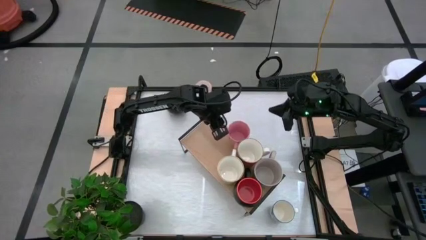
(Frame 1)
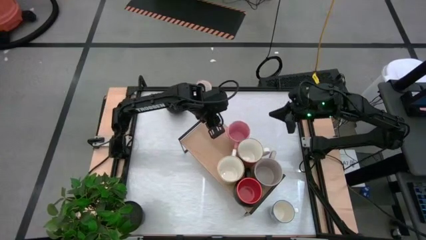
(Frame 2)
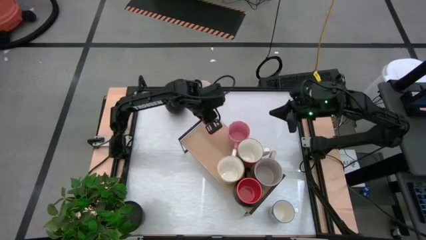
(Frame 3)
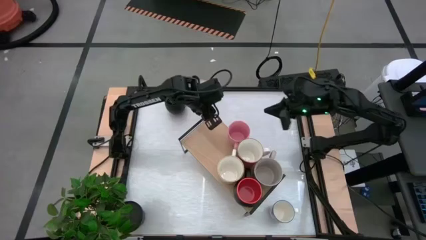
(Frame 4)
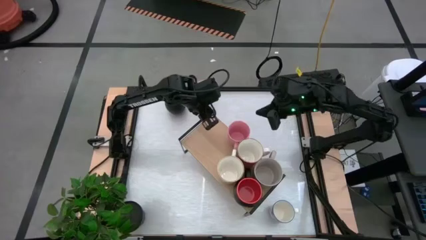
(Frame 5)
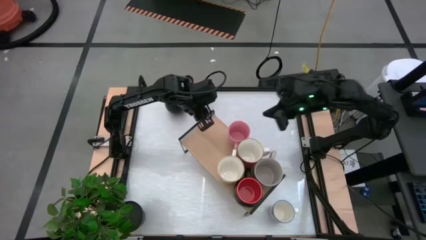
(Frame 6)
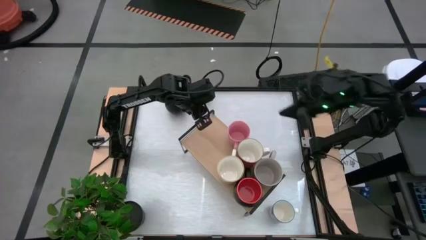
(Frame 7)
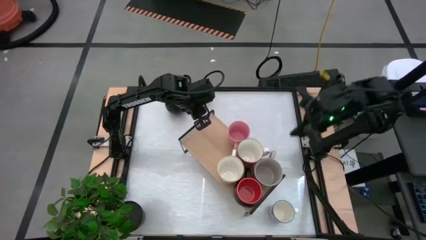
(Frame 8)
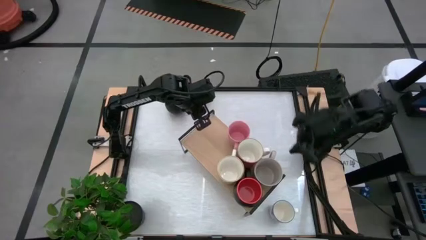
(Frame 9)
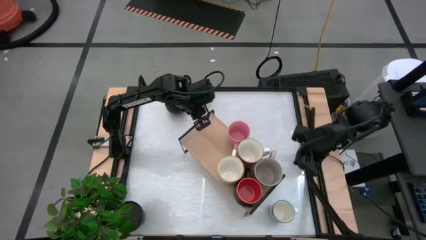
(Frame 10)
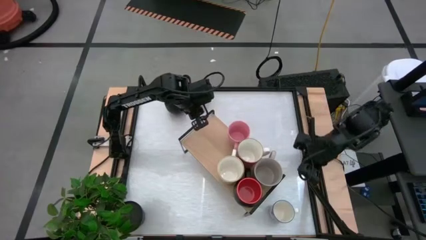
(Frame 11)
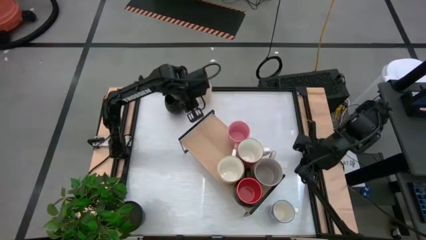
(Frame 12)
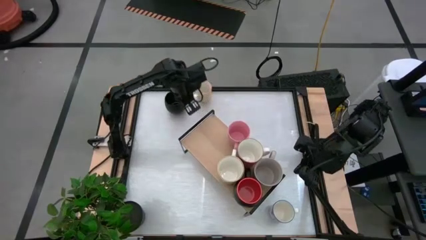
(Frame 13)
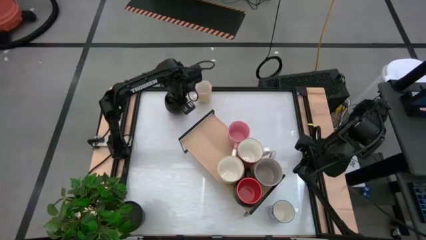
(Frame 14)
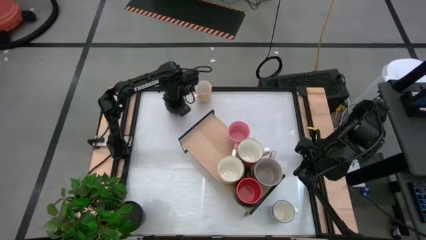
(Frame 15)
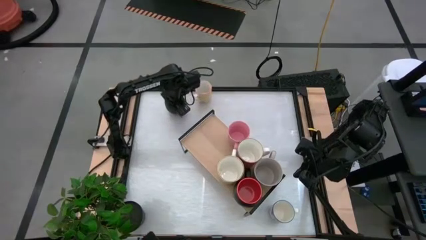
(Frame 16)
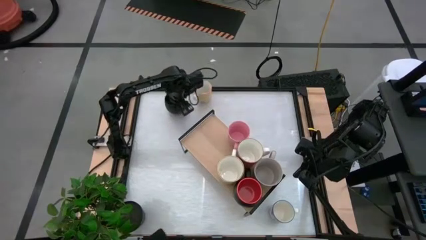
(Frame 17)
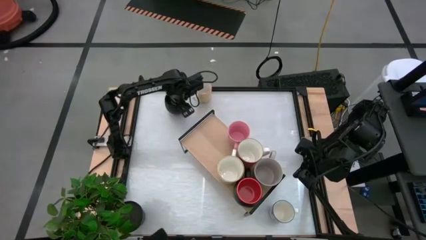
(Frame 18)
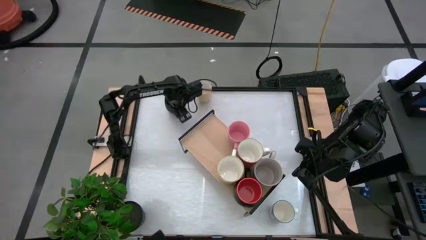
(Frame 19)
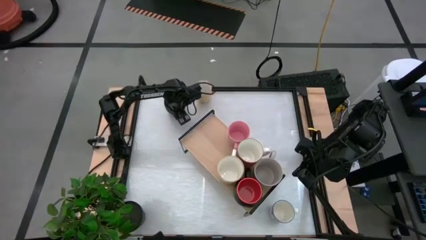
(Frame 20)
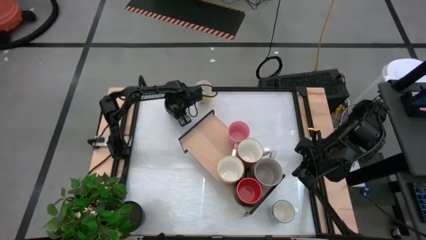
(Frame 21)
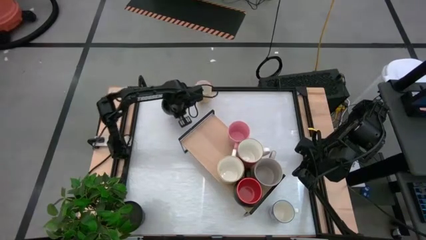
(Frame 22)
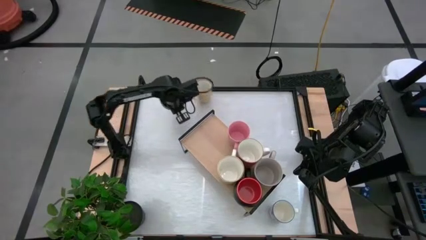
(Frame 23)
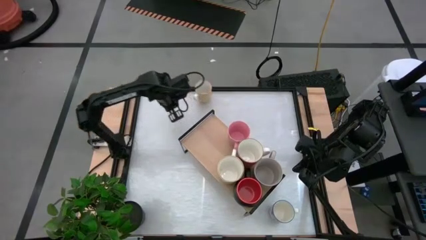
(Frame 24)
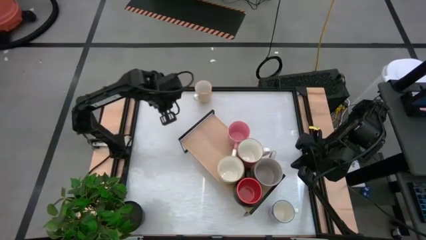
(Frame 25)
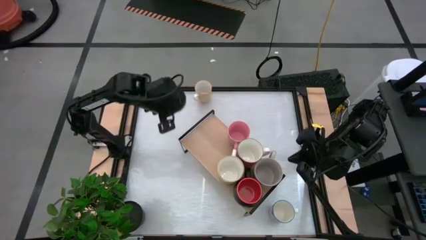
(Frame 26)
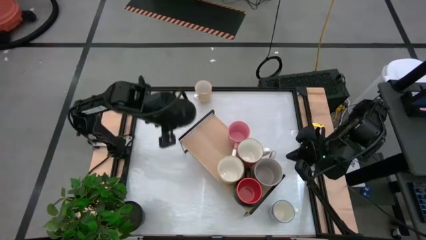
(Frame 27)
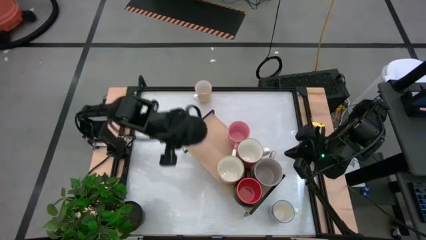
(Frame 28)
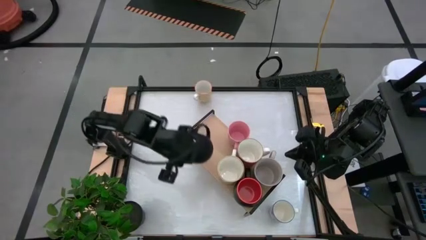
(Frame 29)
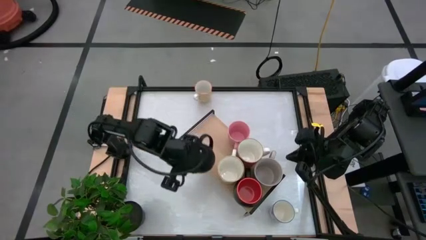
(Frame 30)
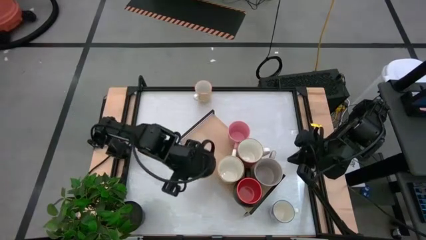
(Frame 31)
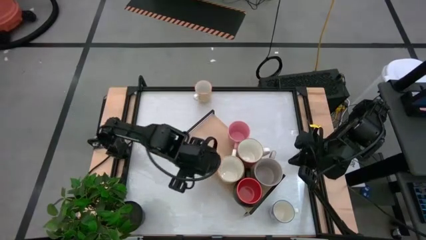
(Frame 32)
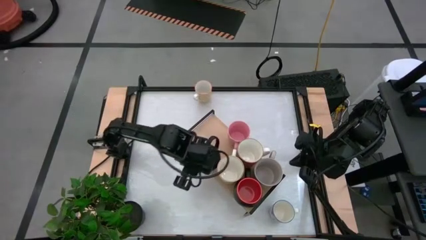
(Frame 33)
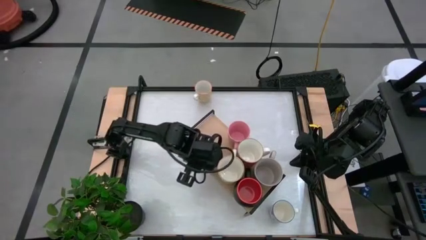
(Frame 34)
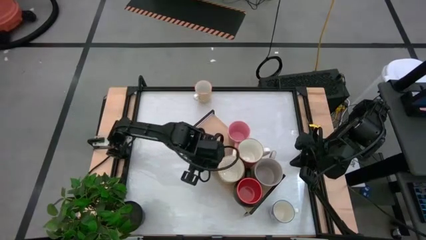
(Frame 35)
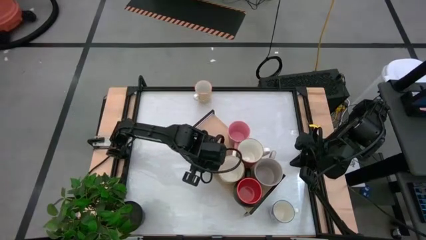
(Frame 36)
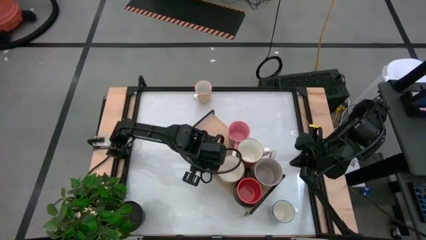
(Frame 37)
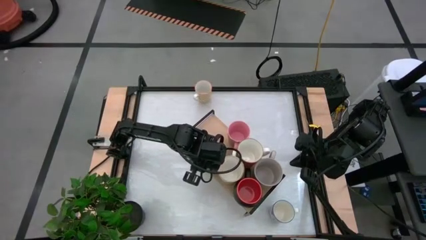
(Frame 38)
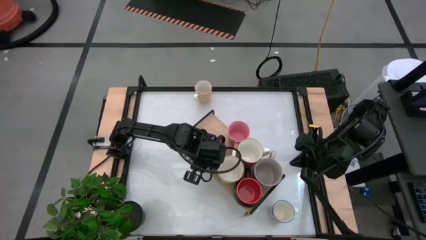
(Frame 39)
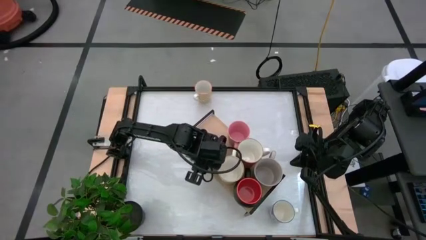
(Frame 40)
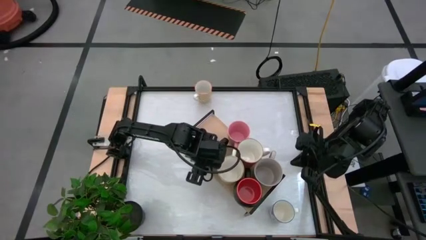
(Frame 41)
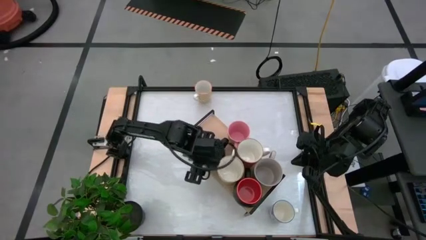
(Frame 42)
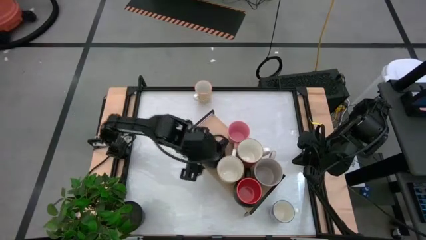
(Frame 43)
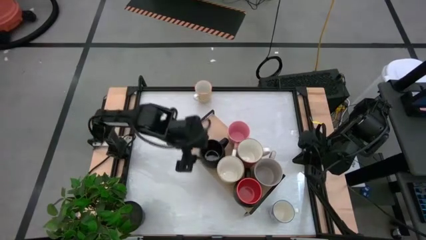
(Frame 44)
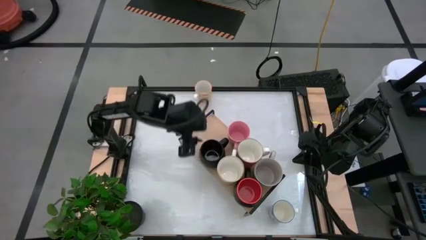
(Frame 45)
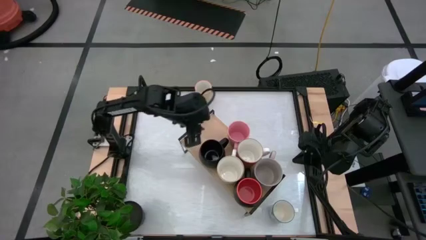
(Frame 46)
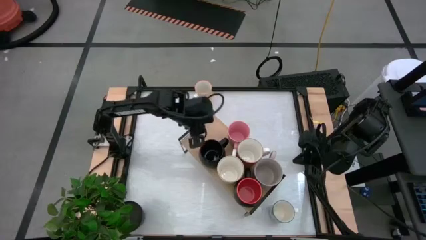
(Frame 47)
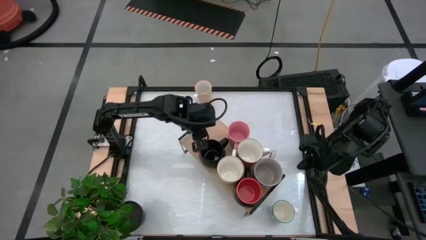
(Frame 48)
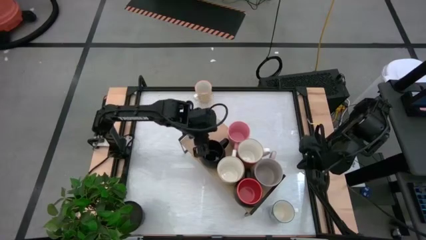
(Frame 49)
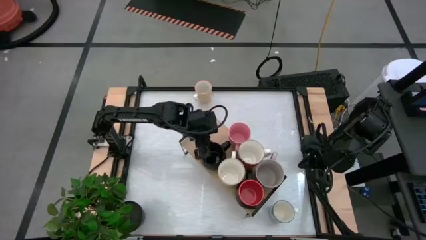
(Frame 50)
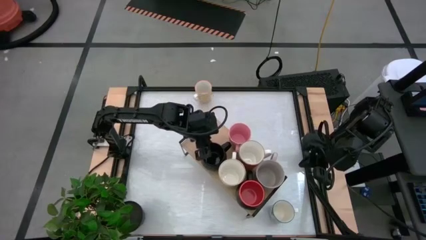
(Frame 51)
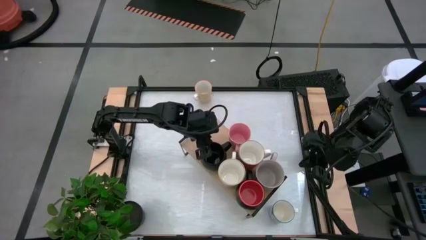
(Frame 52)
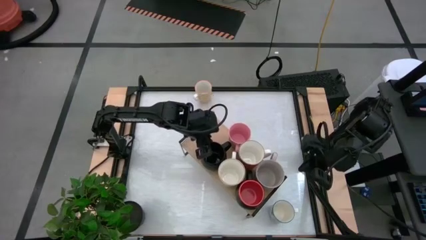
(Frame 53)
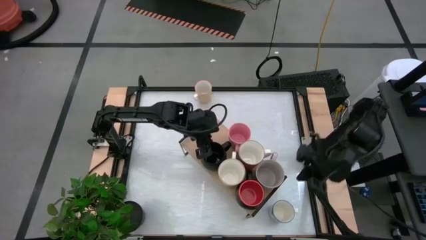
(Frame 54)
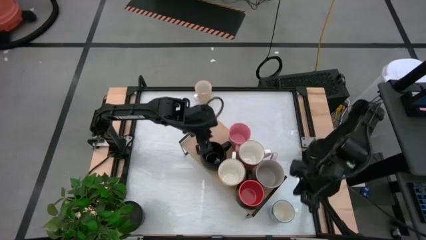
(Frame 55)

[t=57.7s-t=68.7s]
Task: Place coffee mugs
Put the black mug on the shelf

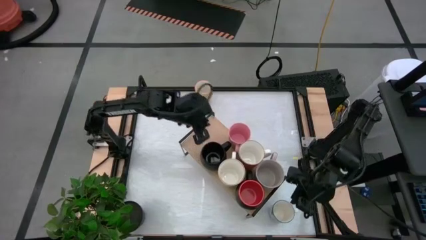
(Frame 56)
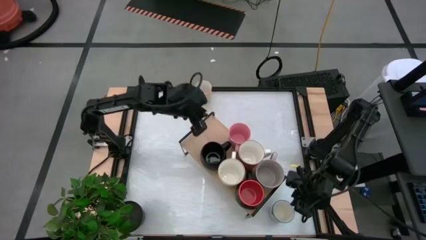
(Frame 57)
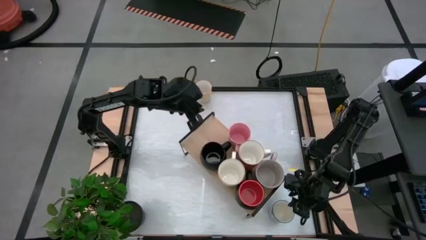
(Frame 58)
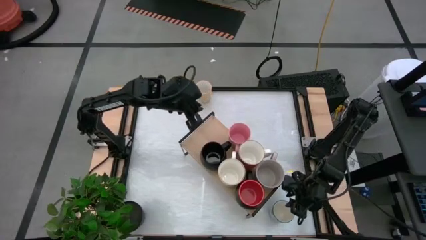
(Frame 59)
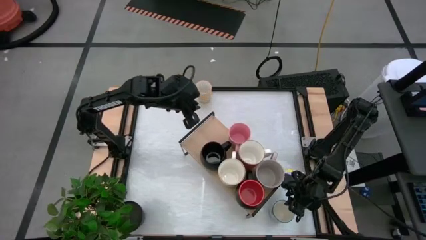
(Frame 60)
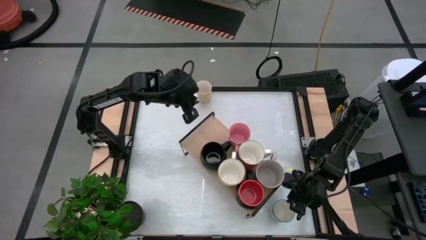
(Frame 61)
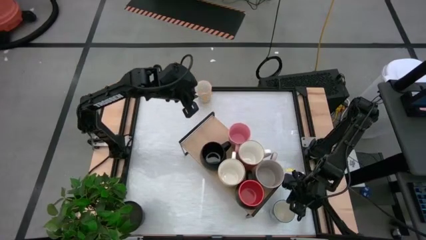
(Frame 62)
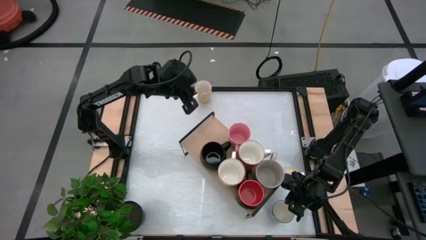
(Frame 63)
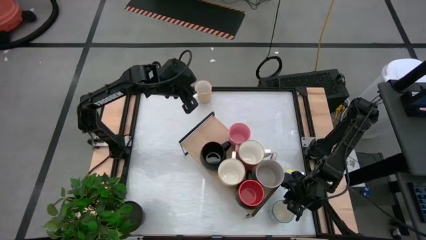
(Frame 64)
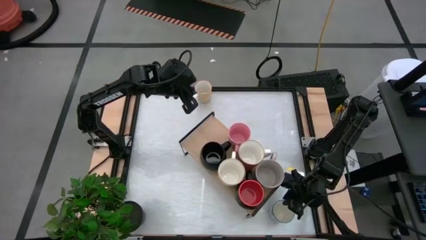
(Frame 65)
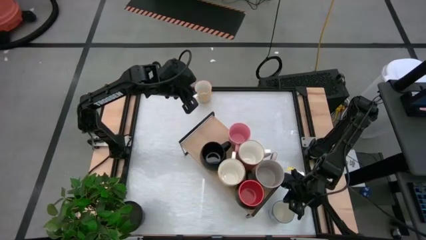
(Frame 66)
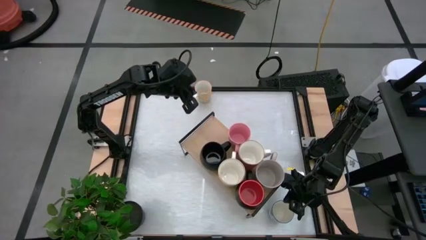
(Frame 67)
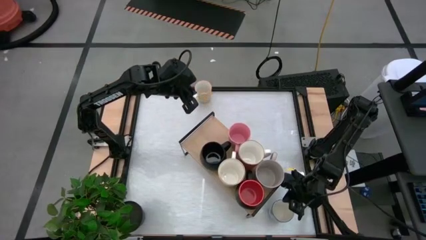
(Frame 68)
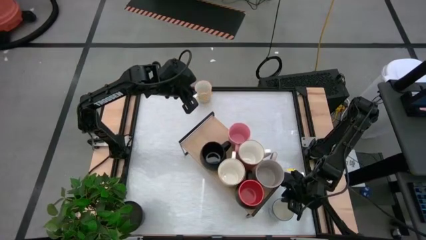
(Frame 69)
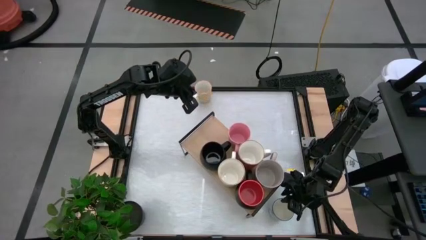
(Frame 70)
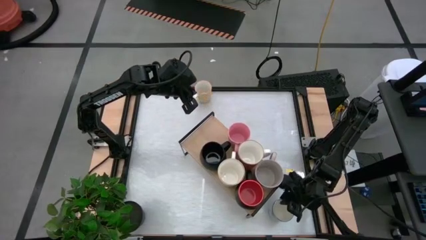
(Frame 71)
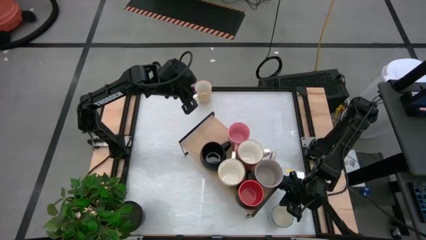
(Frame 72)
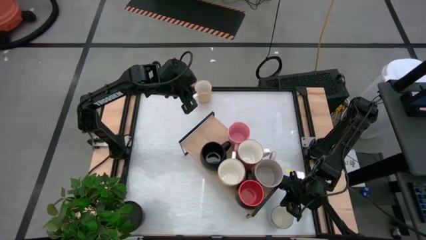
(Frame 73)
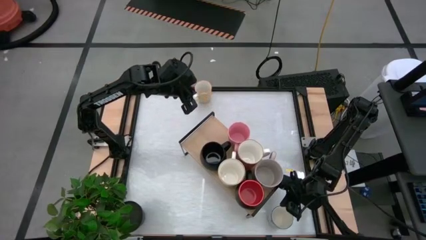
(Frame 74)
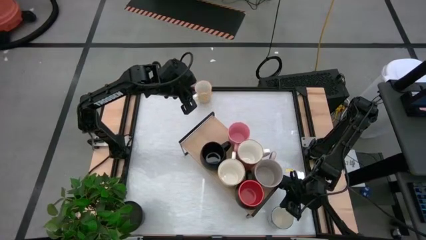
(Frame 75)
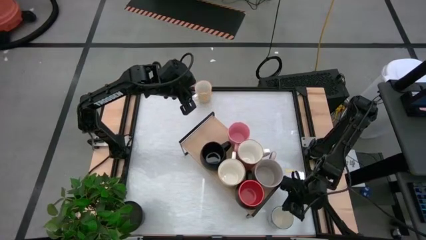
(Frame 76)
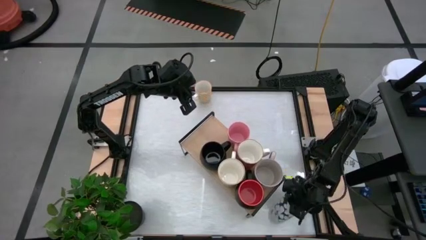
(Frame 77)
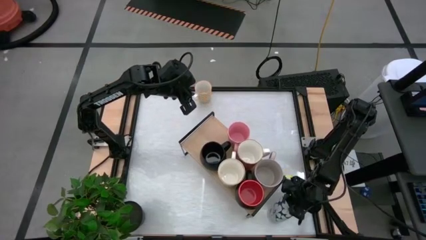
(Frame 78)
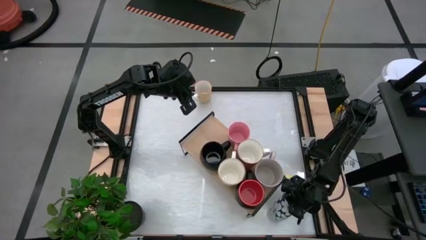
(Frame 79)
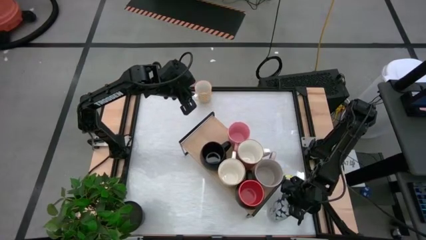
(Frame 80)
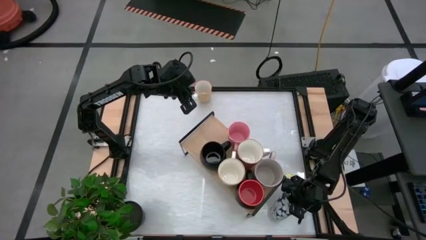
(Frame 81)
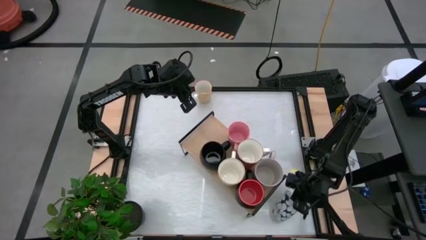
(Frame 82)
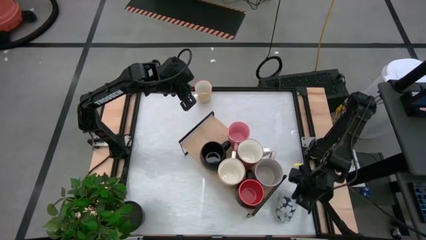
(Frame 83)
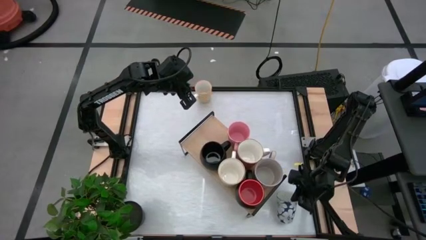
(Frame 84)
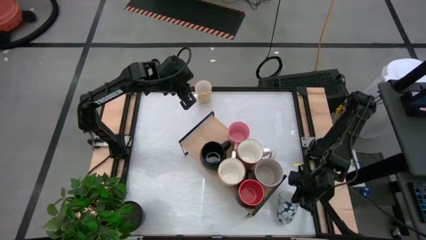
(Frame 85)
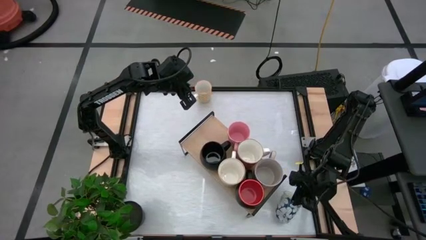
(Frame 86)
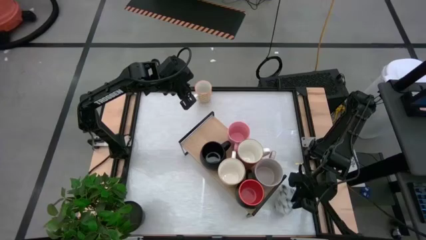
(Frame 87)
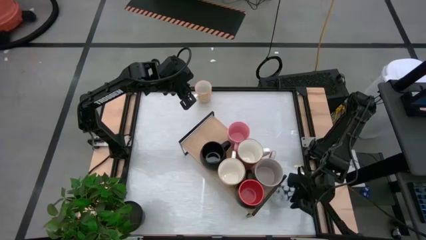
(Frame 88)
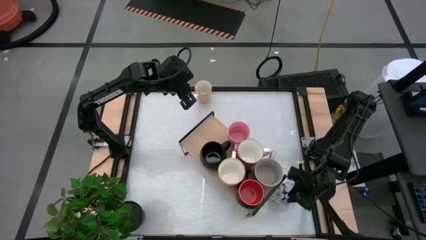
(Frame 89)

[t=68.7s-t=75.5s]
Put the blue-white mug on the shelf
